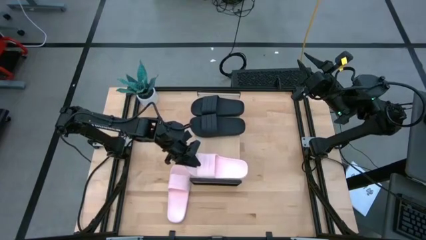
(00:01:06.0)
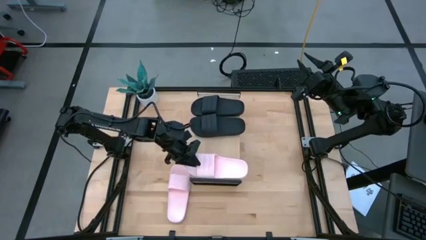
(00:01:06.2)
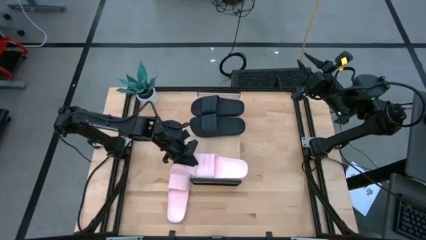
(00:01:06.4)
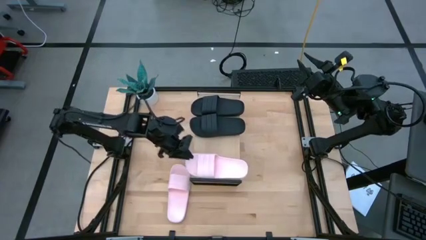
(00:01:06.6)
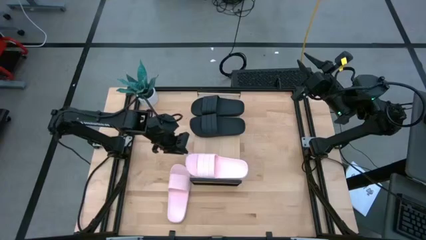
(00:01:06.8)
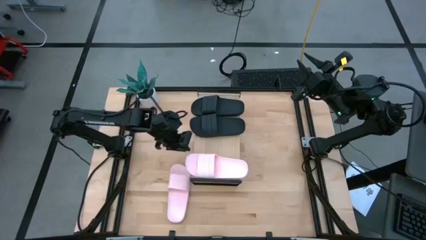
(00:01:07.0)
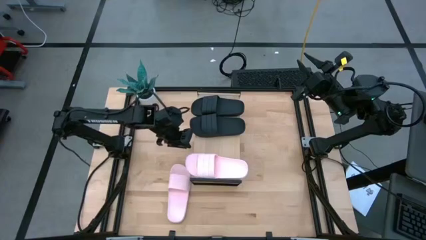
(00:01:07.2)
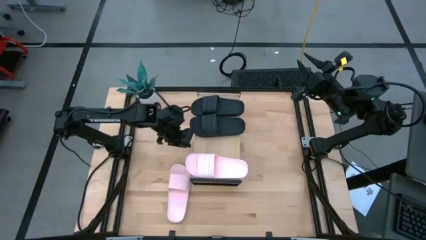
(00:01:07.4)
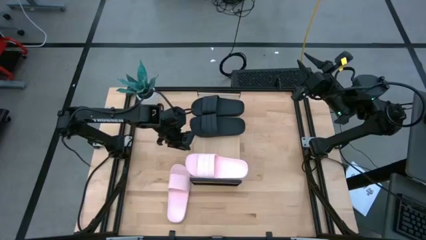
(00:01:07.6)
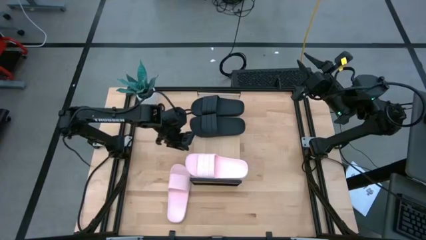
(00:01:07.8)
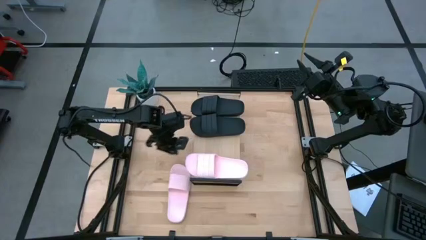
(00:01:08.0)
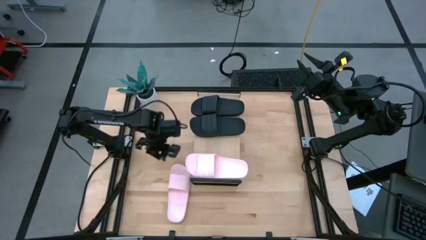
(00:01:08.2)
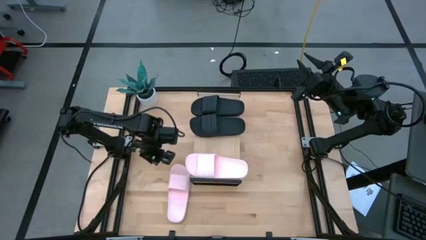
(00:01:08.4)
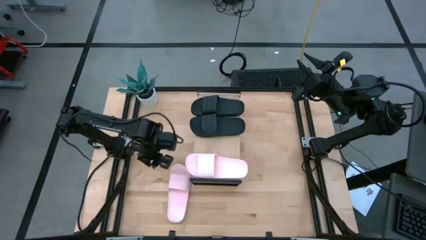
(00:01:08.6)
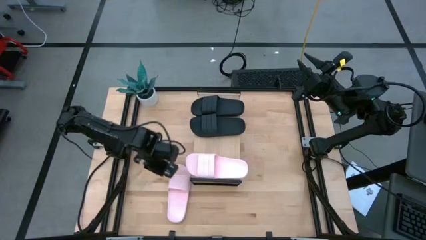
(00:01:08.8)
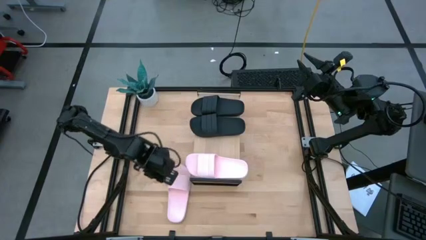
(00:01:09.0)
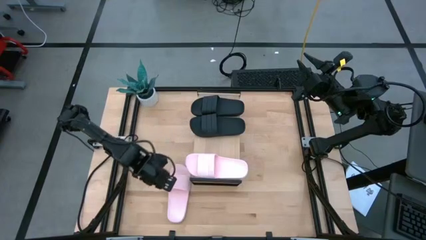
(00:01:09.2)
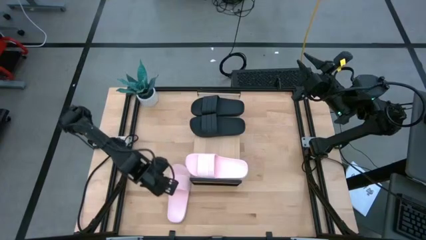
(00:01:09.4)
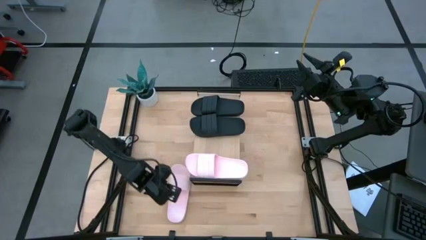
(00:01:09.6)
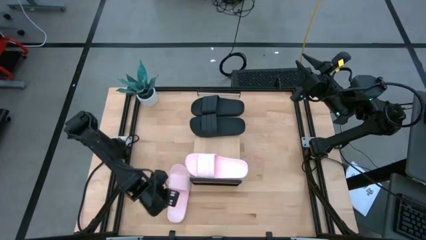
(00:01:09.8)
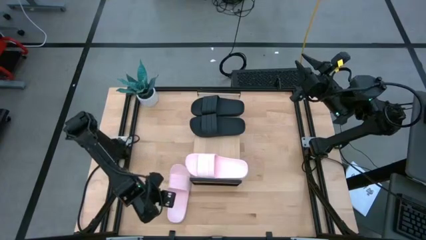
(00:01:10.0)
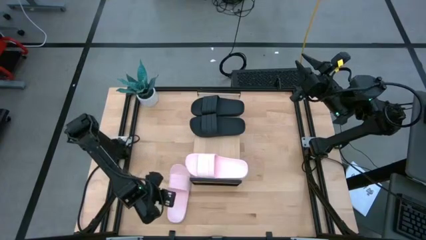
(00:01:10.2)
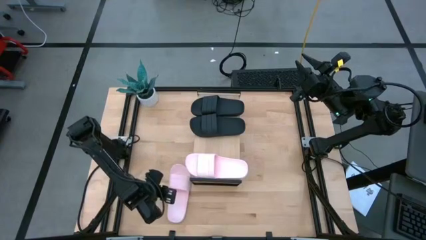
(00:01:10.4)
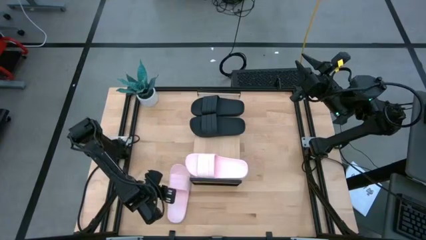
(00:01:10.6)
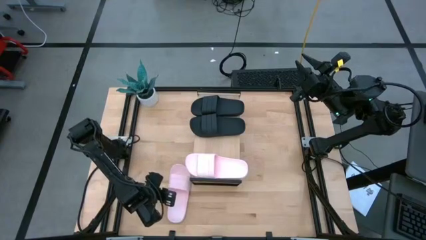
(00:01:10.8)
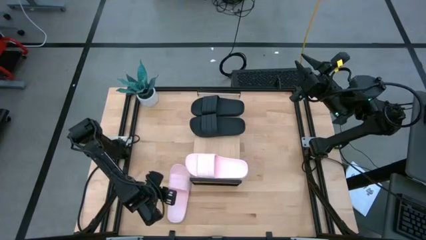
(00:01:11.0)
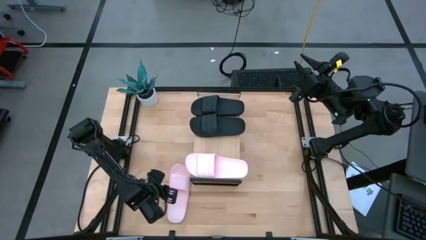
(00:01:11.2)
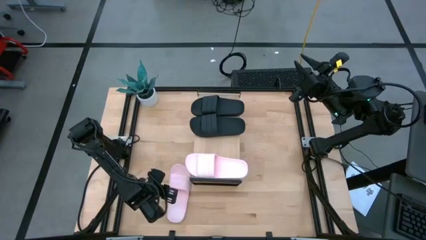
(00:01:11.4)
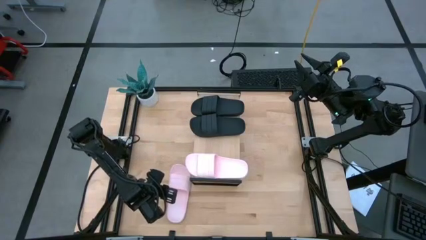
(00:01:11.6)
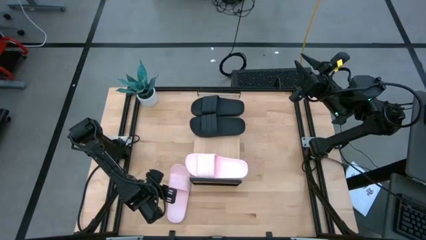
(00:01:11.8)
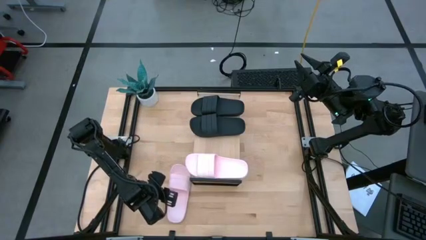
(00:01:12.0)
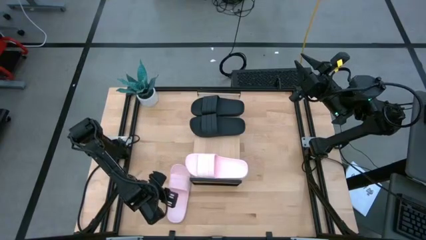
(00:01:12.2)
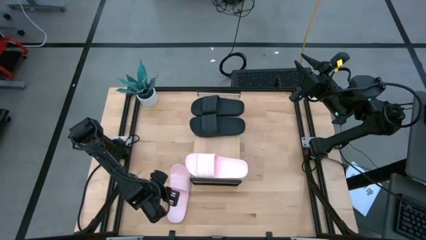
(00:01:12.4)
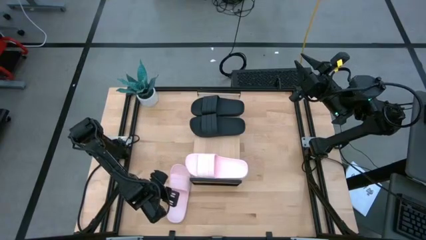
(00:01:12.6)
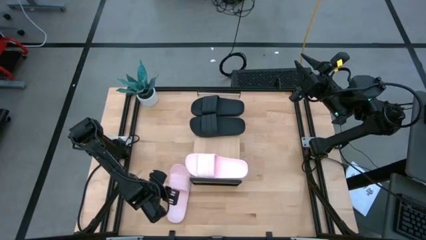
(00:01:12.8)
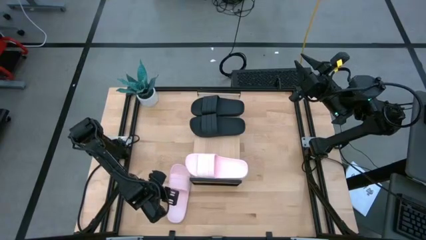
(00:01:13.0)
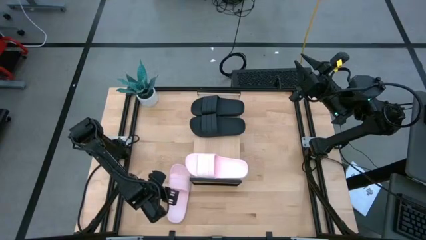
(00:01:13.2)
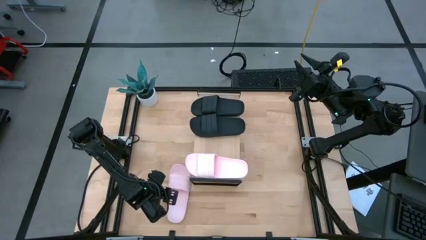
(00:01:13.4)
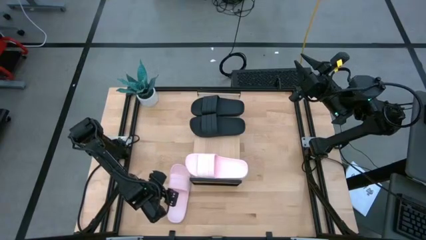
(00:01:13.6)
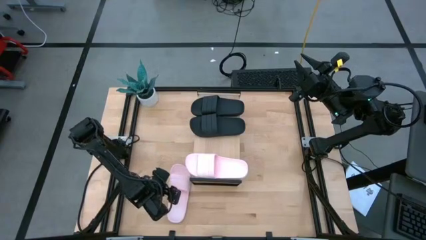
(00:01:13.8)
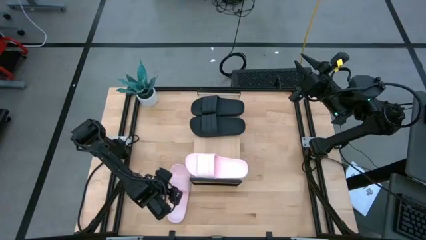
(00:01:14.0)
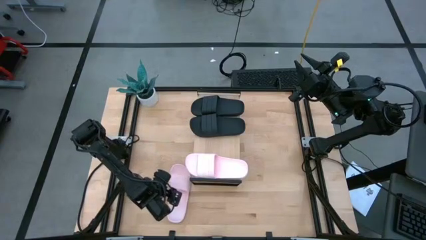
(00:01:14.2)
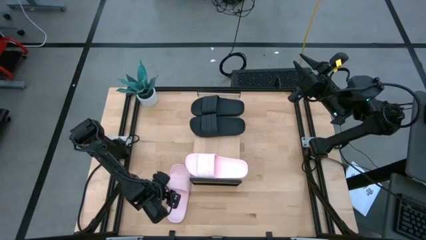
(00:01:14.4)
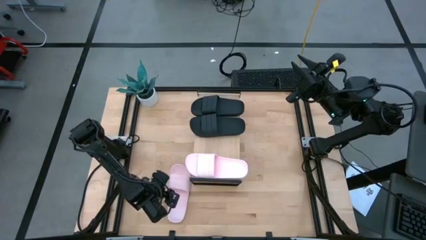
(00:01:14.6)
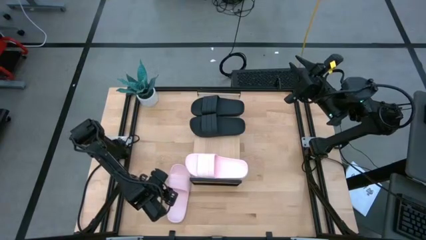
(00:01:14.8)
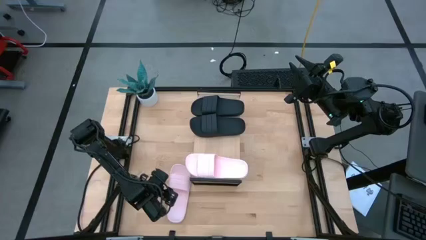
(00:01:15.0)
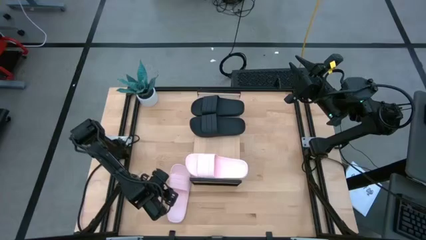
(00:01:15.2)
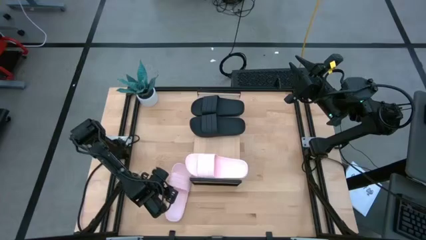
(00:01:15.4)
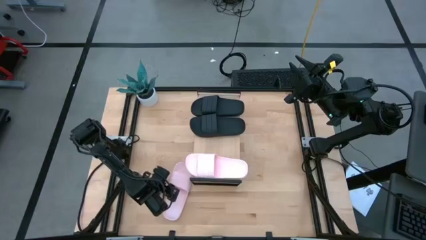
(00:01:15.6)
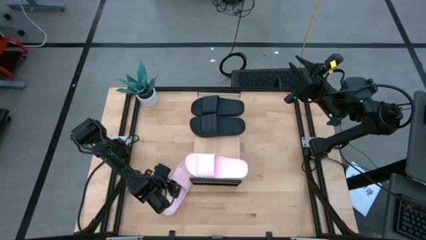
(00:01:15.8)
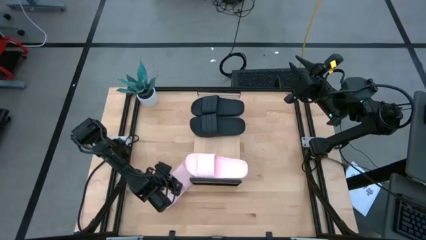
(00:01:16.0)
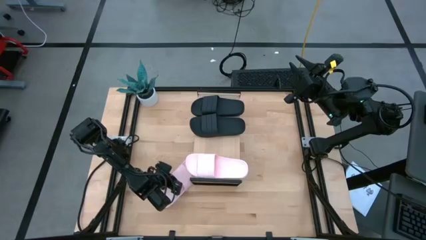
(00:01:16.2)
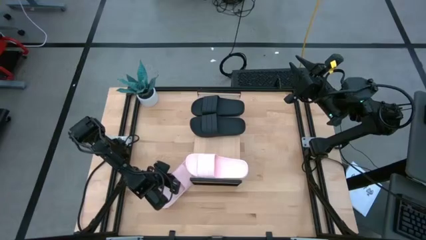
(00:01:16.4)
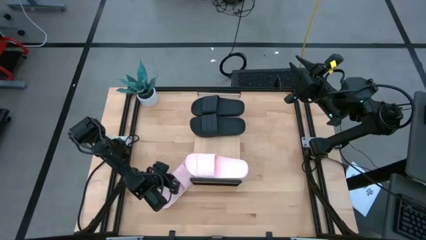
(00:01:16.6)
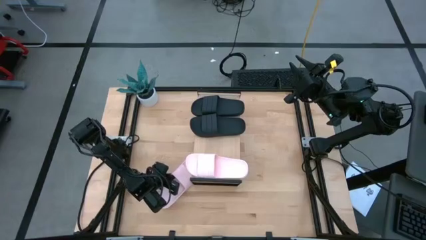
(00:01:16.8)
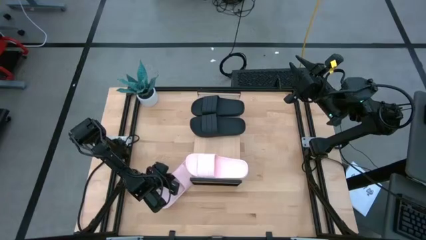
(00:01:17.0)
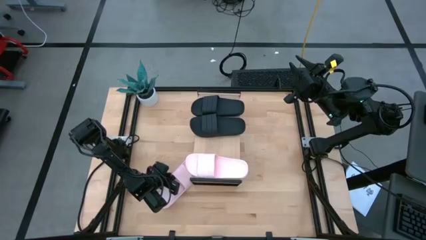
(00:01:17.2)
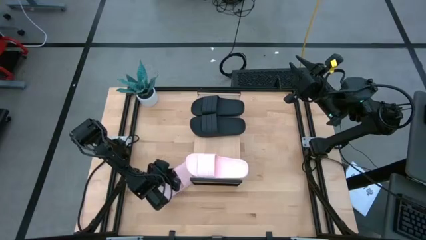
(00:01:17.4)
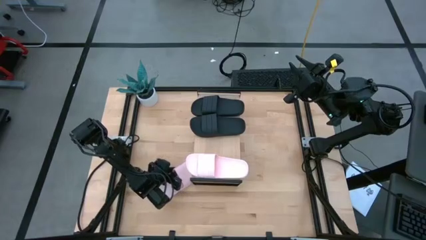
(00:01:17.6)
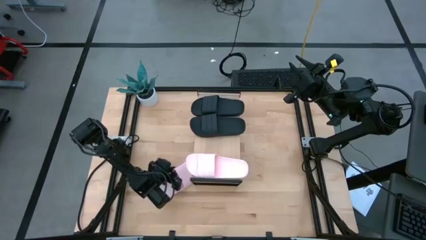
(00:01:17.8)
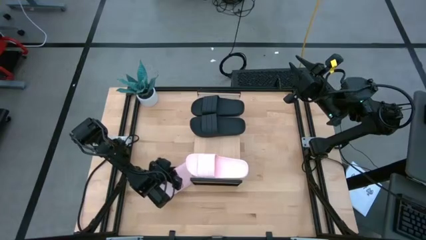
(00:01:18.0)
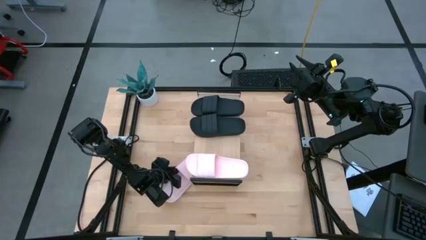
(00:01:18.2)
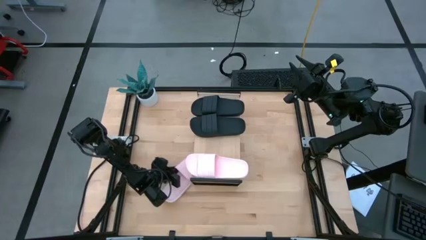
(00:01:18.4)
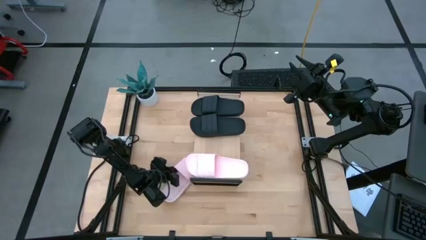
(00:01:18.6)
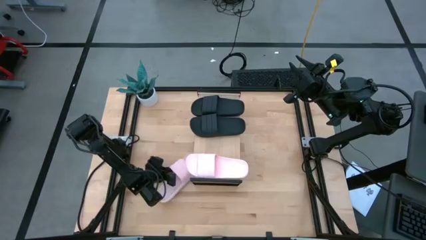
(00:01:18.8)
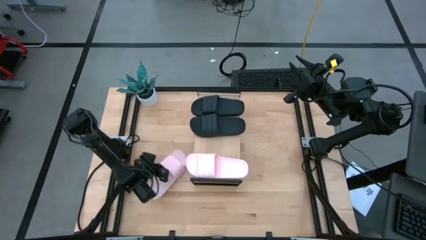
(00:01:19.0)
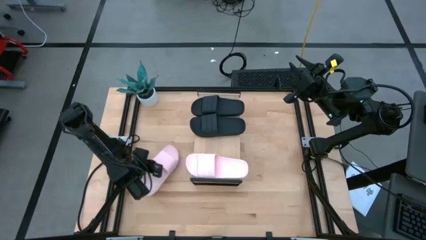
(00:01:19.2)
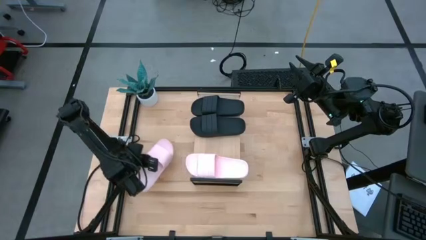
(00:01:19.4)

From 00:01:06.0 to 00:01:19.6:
Task: Pick and place slides into the shelf
Put the white slides on the shelf

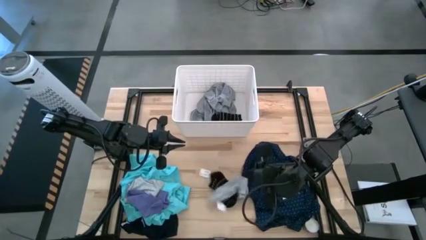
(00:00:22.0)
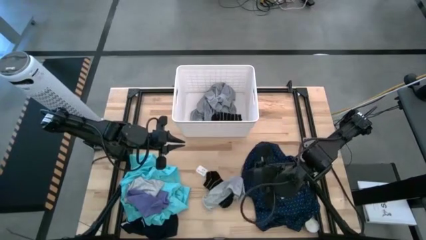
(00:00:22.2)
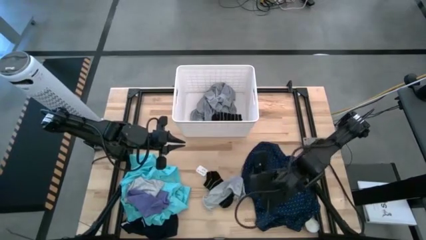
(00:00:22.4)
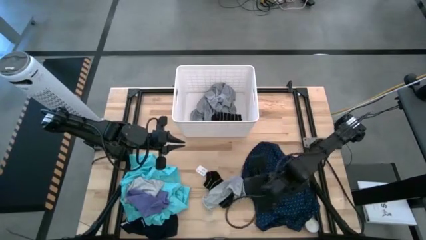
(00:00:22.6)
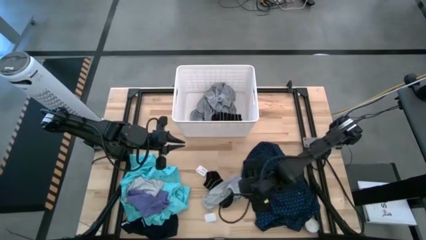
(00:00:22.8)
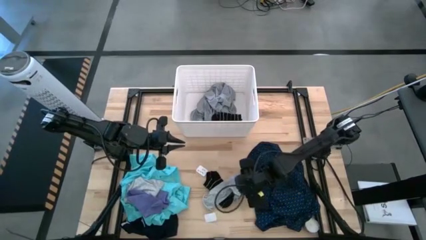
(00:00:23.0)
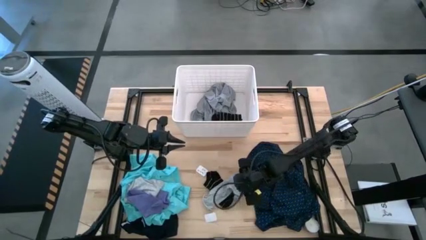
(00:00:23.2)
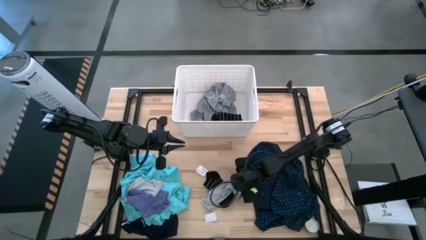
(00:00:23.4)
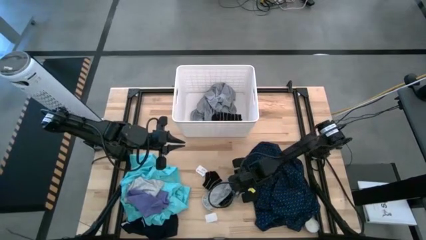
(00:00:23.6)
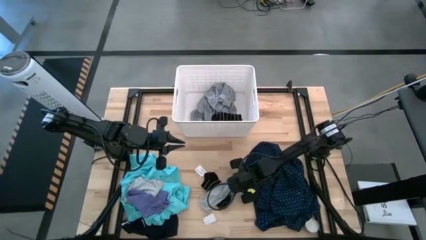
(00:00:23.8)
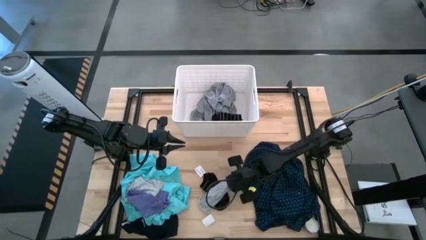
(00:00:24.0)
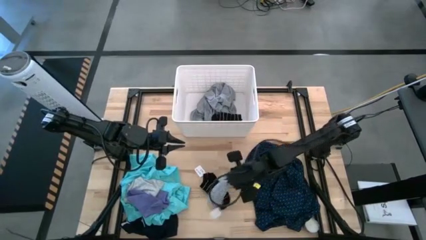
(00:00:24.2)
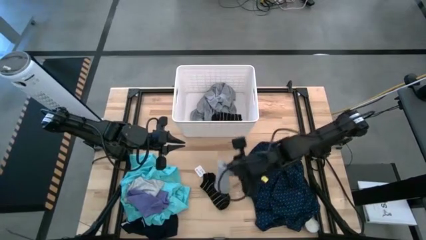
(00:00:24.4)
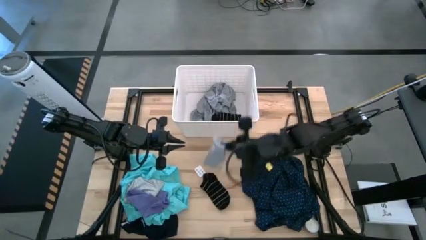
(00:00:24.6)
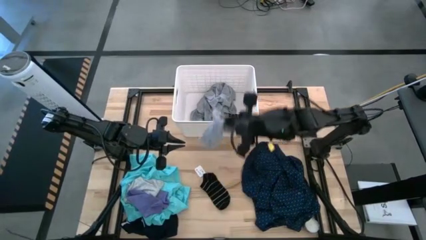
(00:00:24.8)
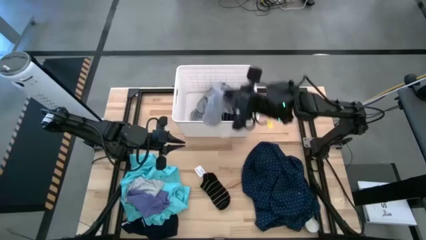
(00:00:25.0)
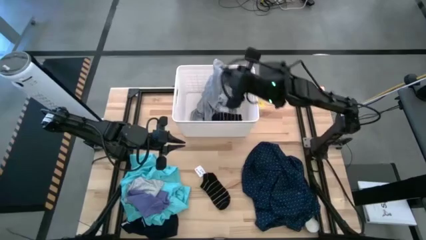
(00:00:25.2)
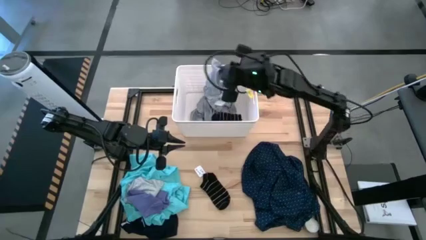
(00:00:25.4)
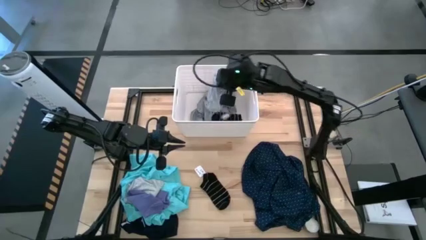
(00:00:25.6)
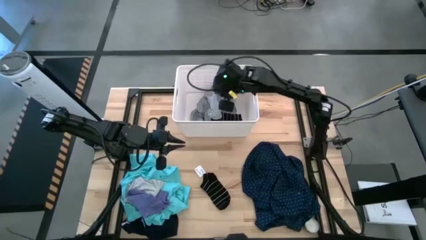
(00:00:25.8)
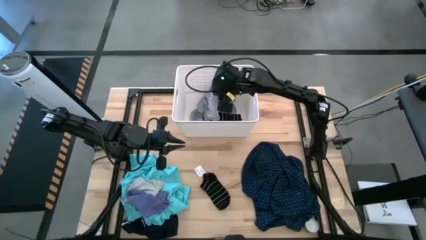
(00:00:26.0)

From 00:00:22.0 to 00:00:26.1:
Task: Sort clothes
Put the gray sock into the white laundry bin
